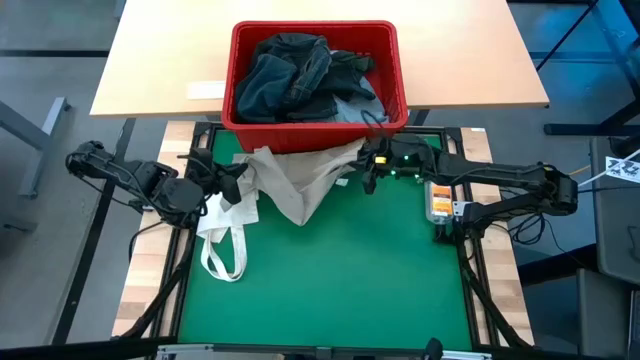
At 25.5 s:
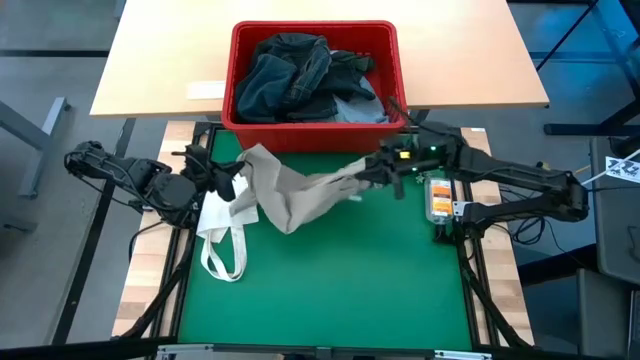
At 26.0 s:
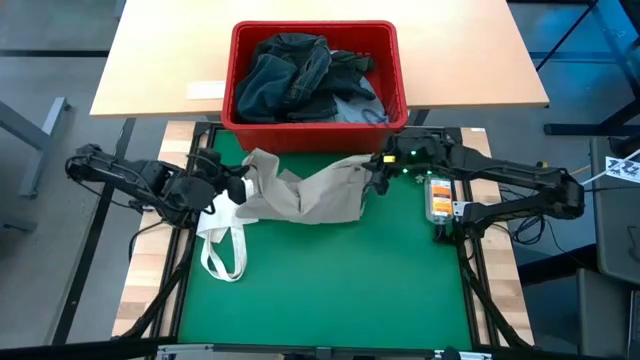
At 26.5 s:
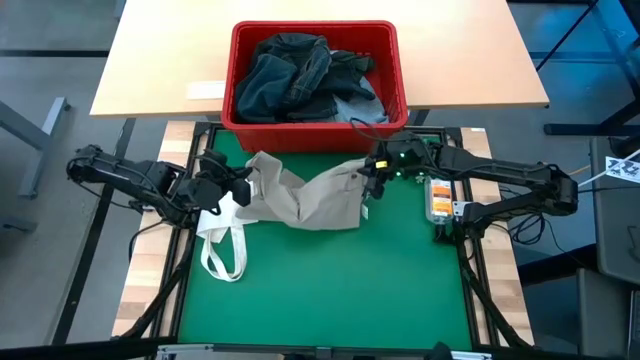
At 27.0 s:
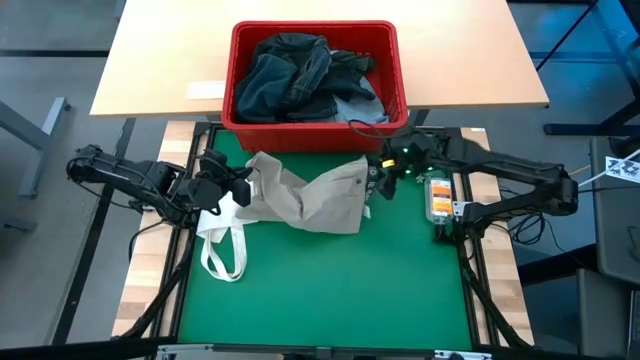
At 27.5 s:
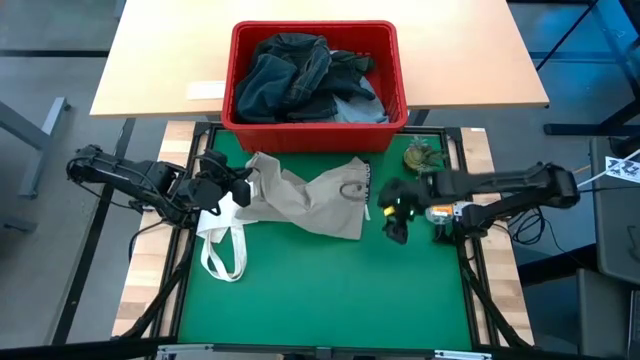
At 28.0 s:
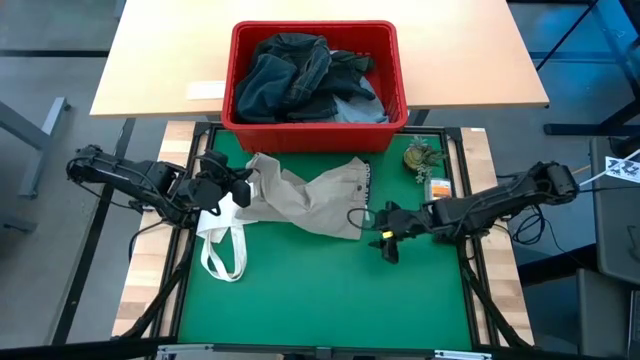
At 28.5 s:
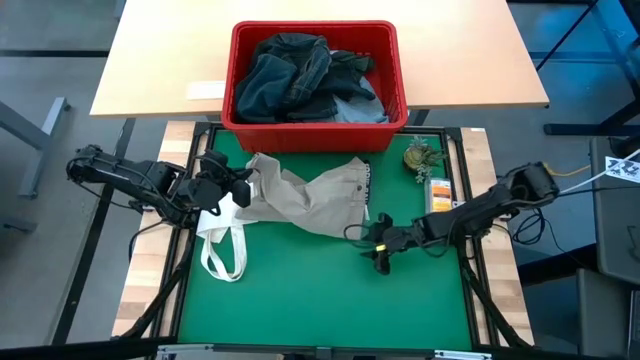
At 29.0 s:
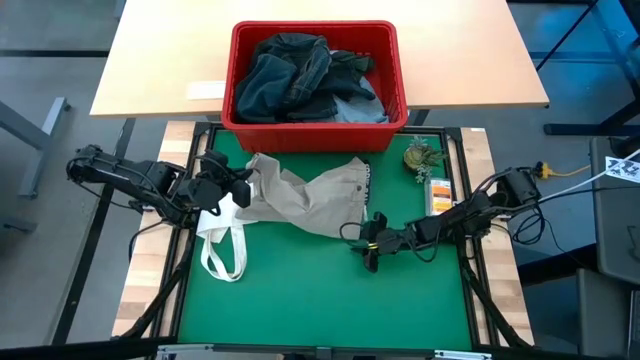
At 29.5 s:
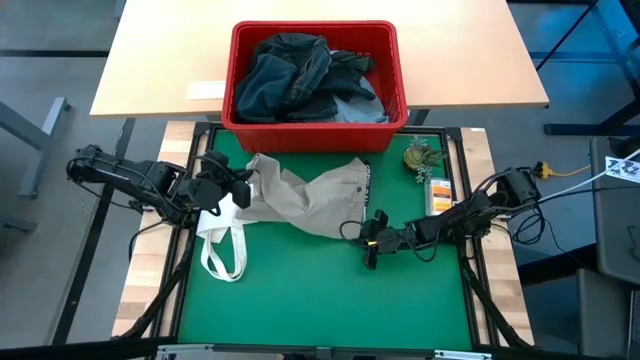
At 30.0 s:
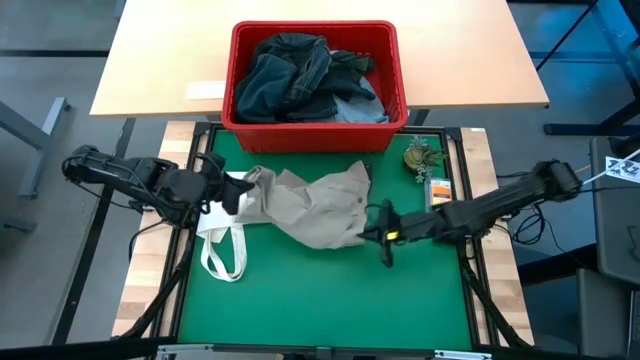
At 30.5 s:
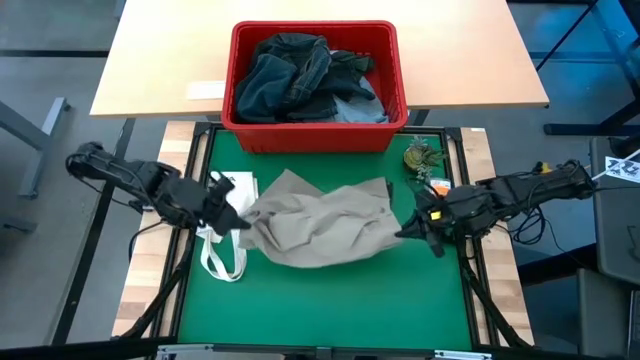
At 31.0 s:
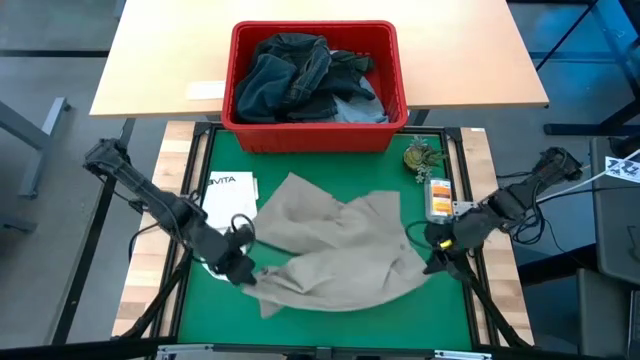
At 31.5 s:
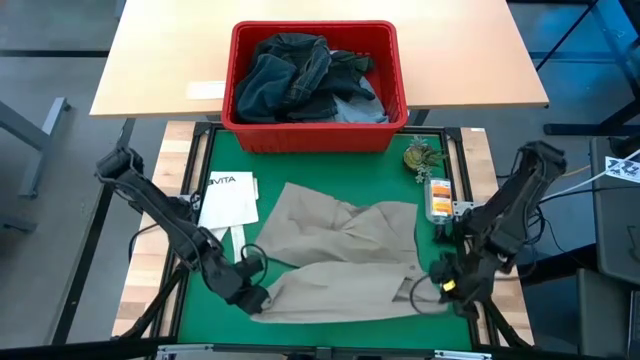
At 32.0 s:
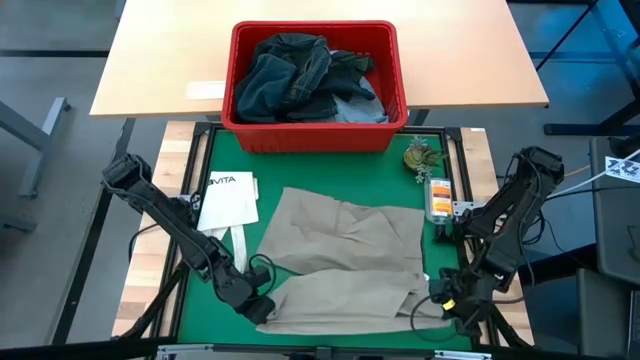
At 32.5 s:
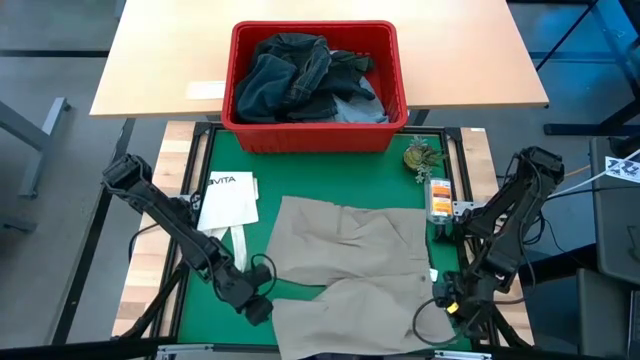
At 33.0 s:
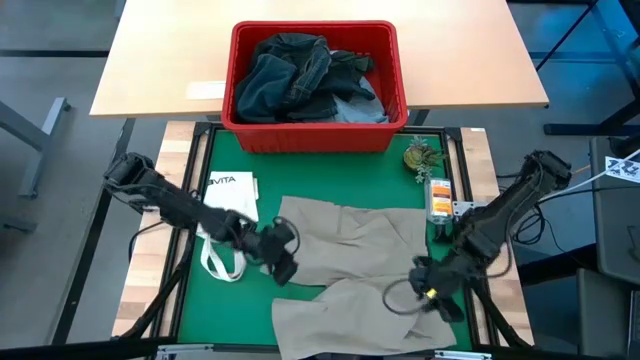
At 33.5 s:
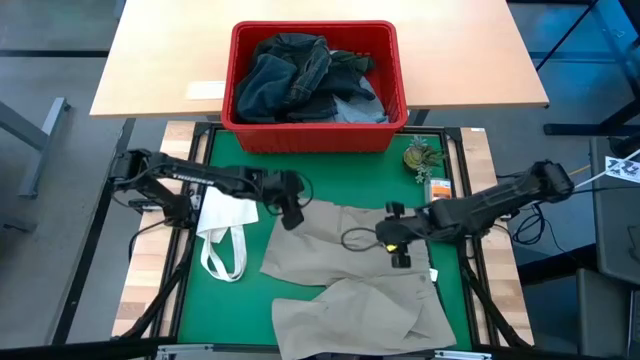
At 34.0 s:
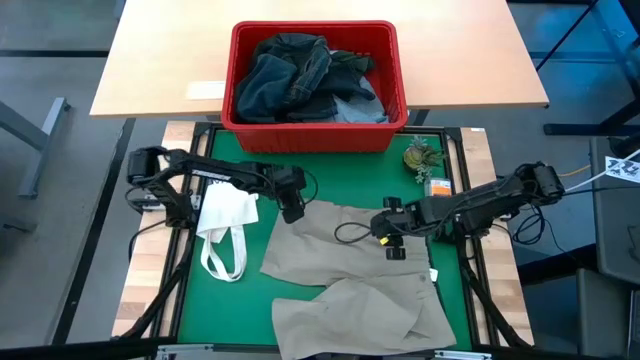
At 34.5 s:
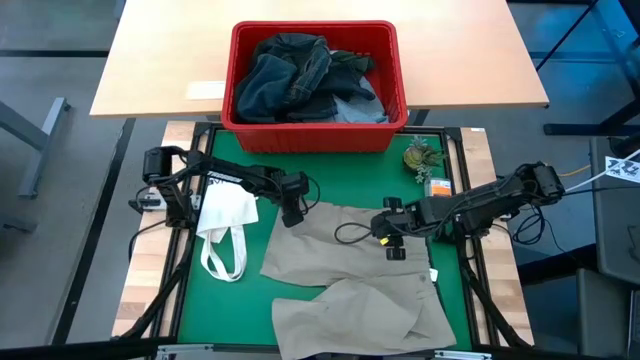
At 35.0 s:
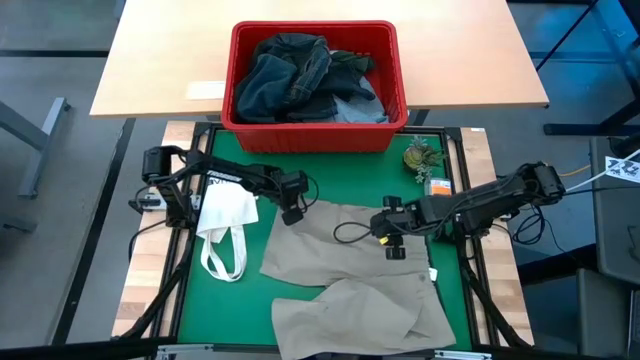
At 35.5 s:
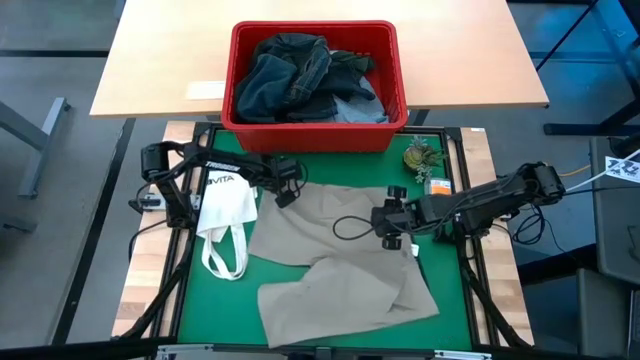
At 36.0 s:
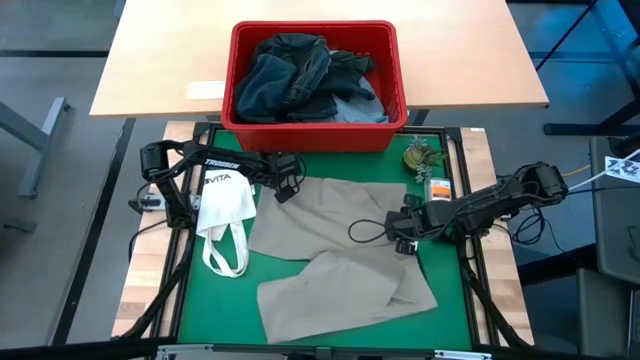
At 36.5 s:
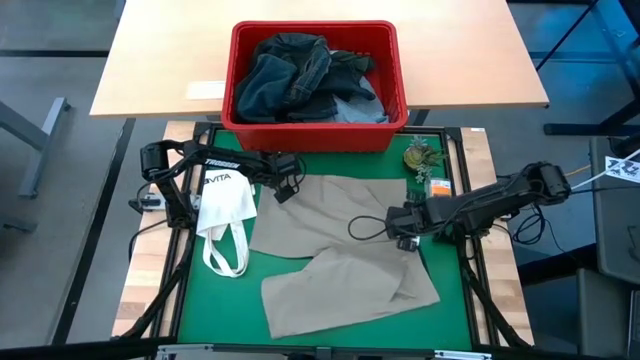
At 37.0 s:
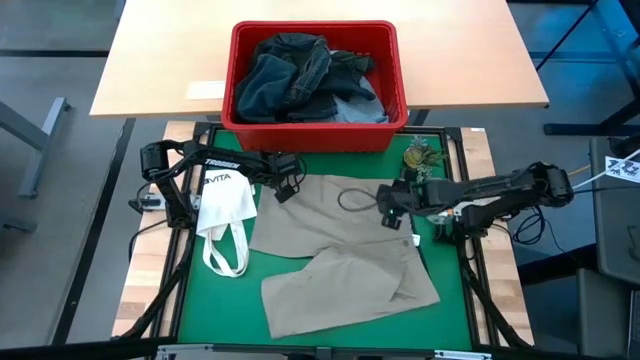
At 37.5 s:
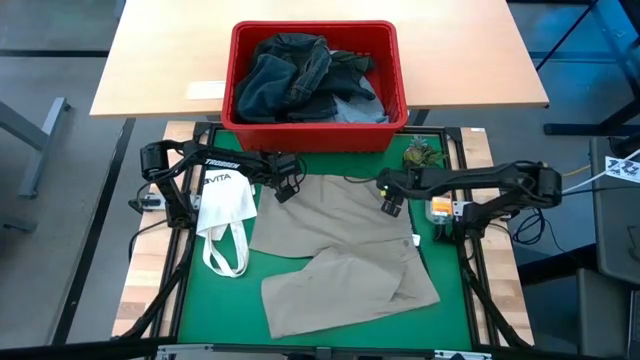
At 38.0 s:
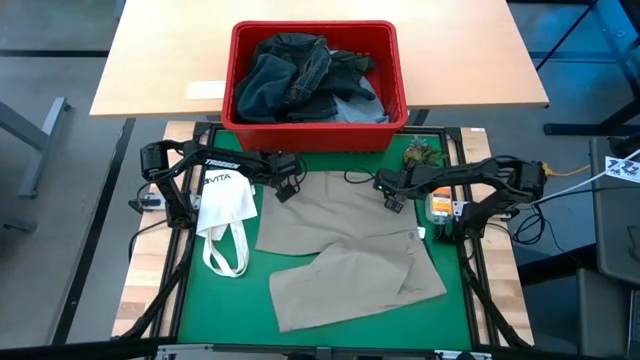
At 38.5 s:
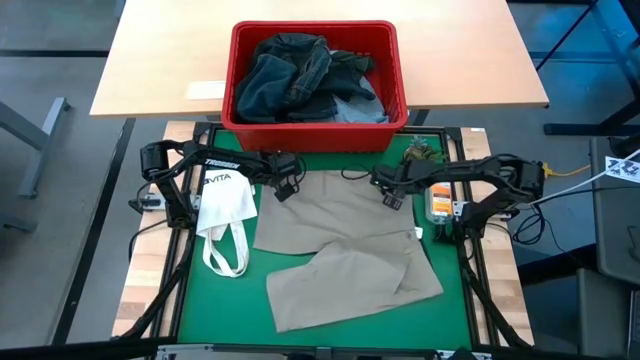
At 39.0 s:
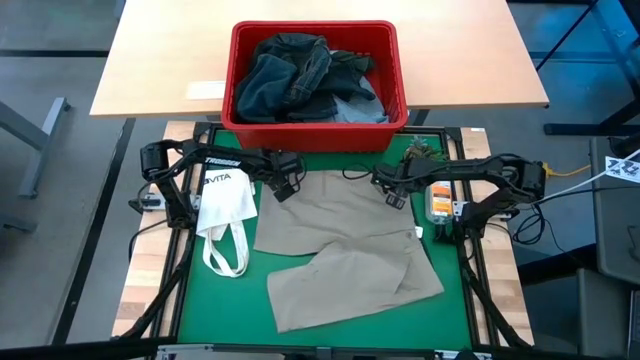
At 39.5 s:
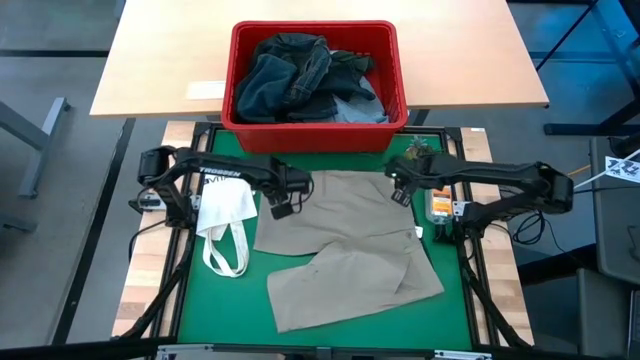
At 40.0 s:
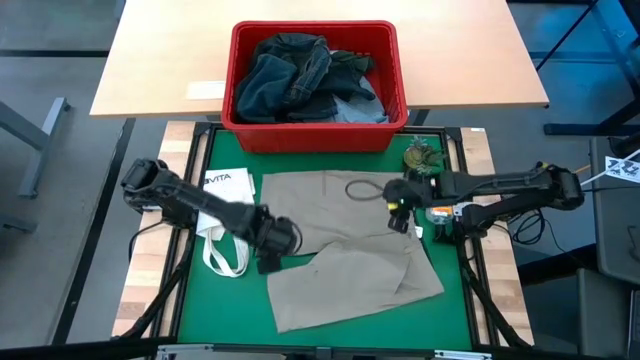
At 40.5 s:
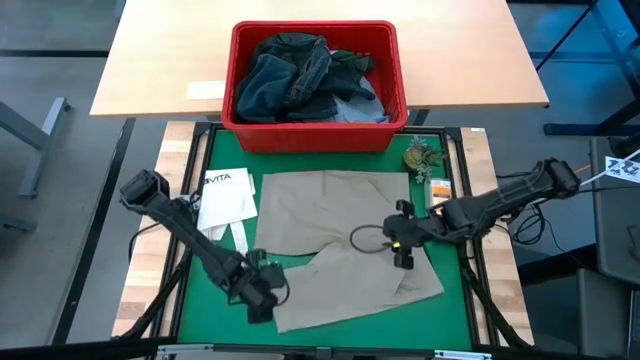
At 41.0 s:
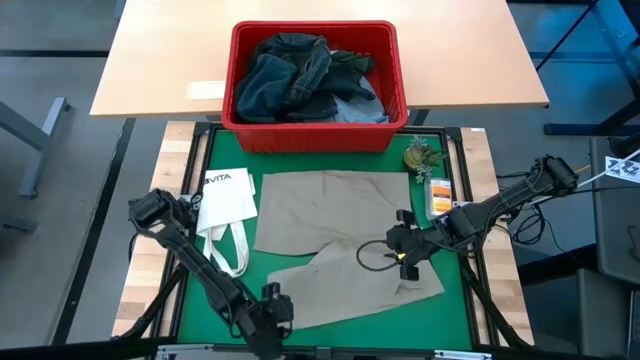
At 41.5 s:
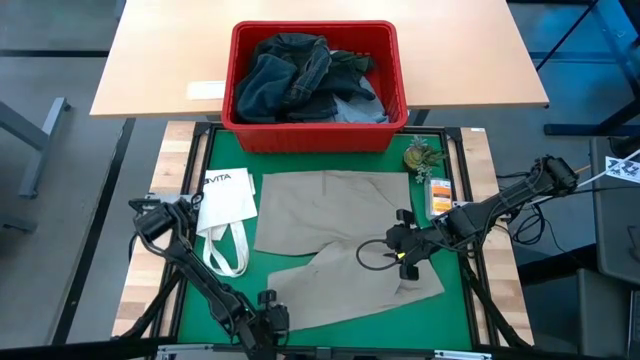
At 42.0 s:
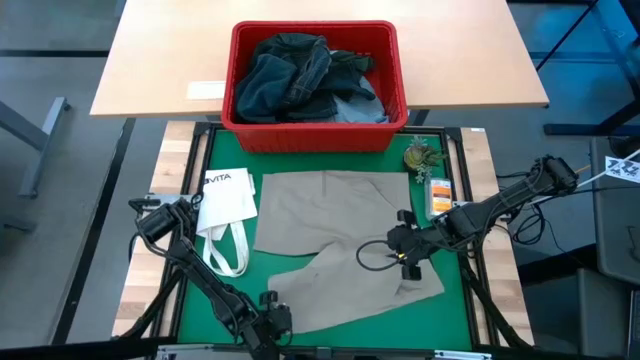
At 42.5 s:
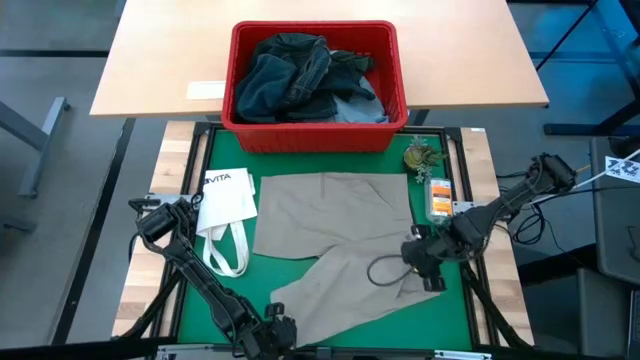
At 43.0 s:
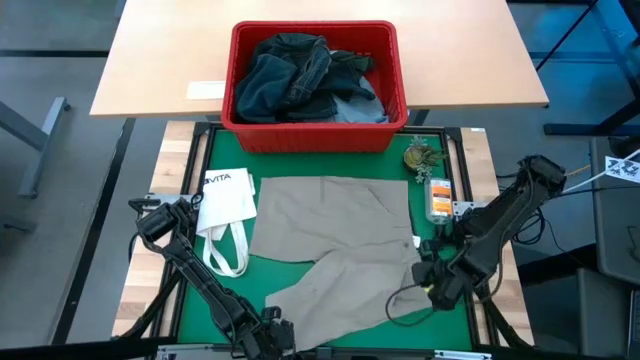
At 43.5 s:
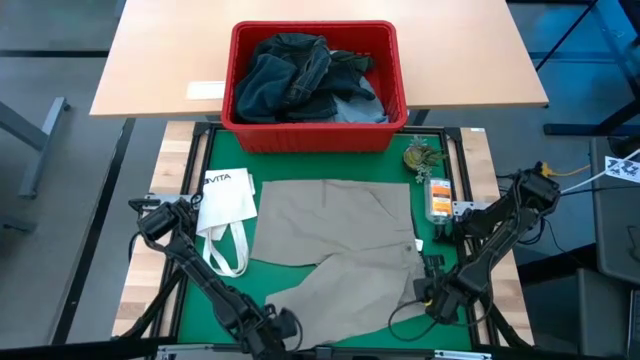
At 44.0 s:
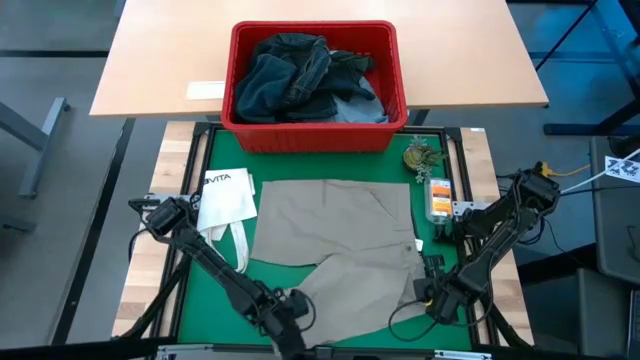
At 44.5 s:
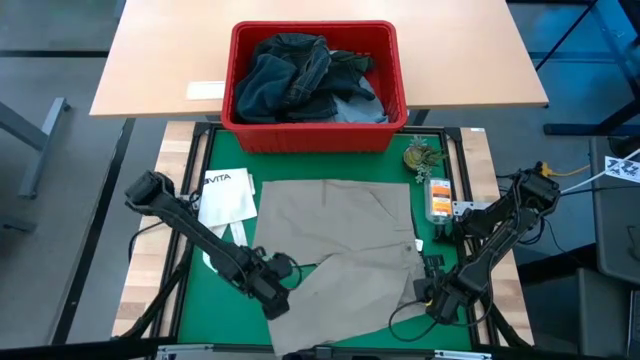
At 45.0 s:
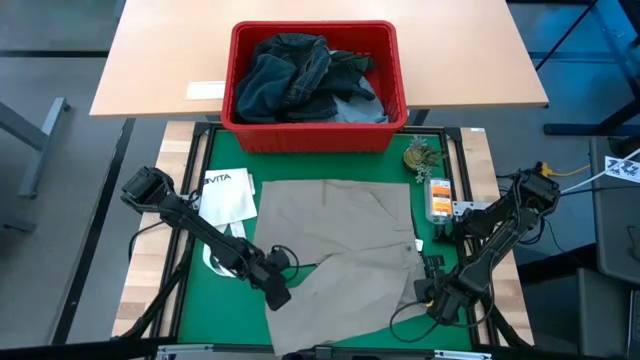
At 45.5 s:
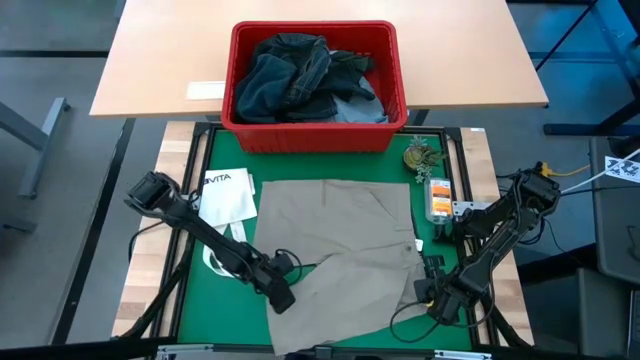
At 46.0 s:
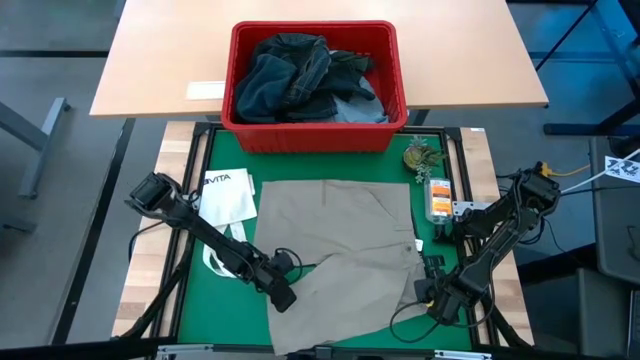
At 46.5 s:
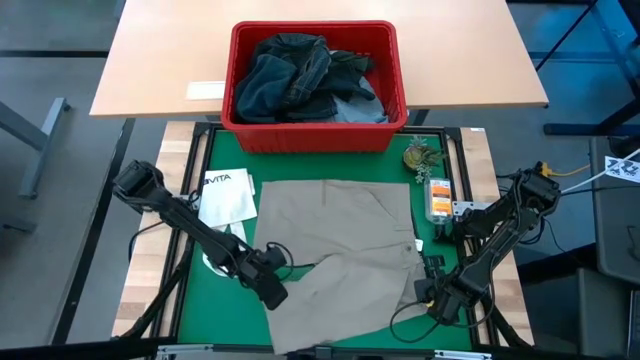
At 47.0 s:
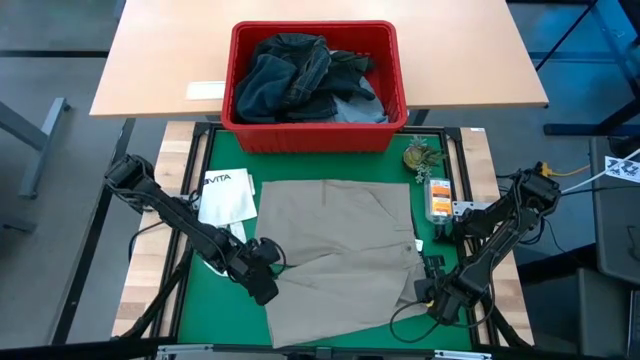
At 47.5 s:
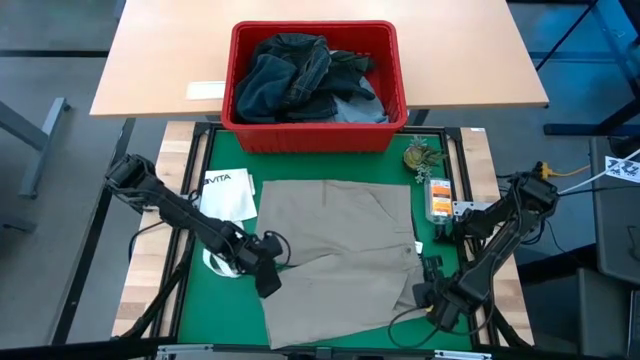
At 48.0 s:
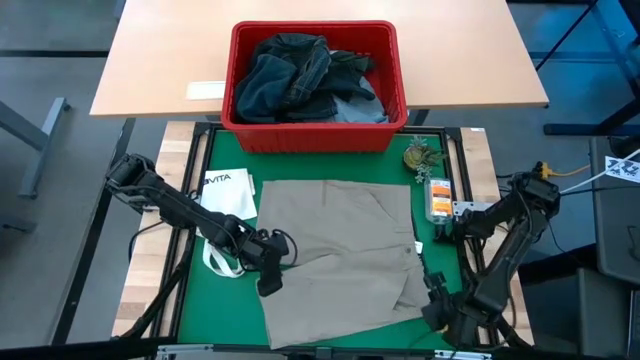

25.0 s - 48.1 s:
Task: Fold Laundry from Bin
Fold the gray shorts
